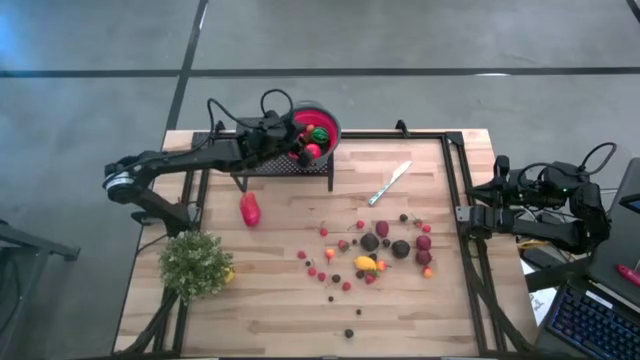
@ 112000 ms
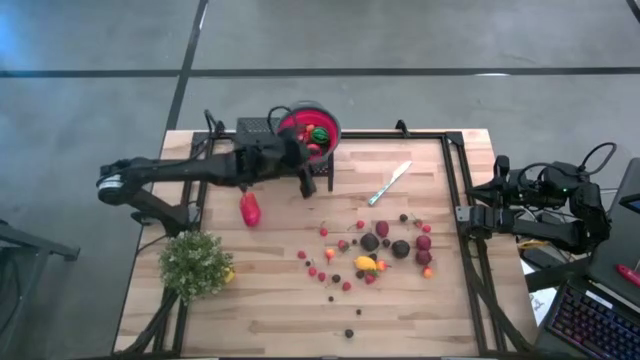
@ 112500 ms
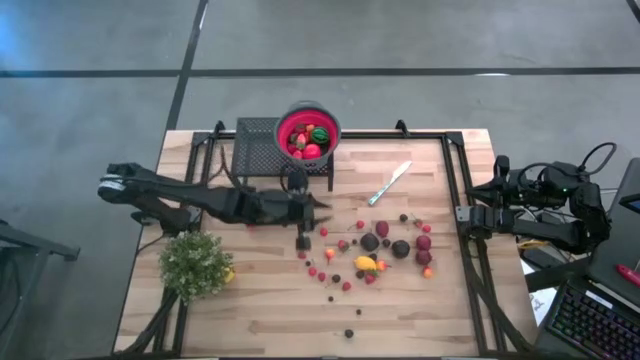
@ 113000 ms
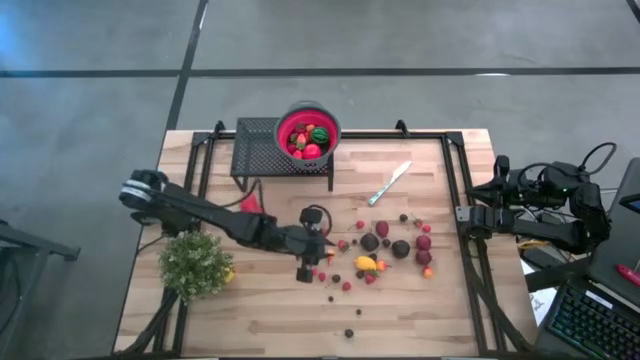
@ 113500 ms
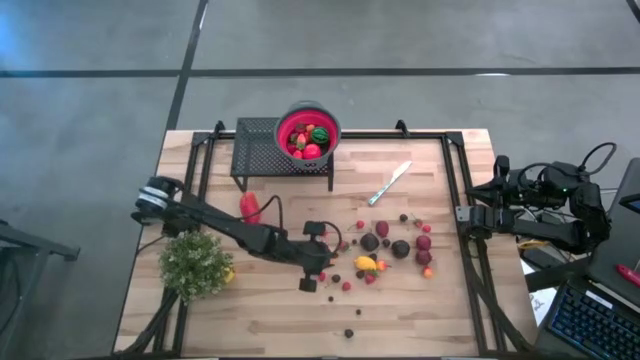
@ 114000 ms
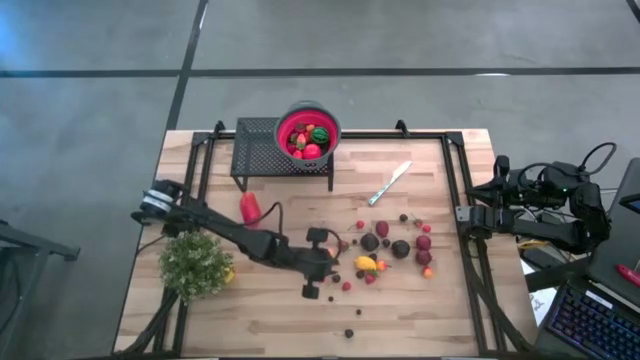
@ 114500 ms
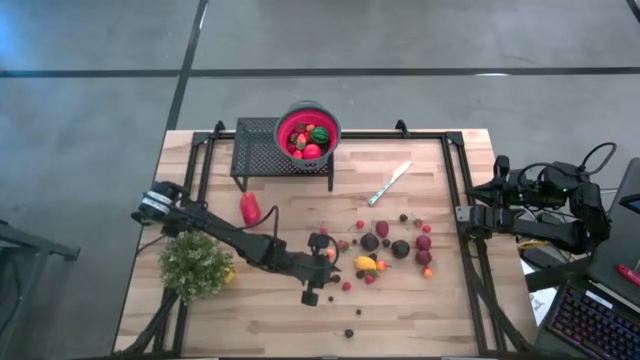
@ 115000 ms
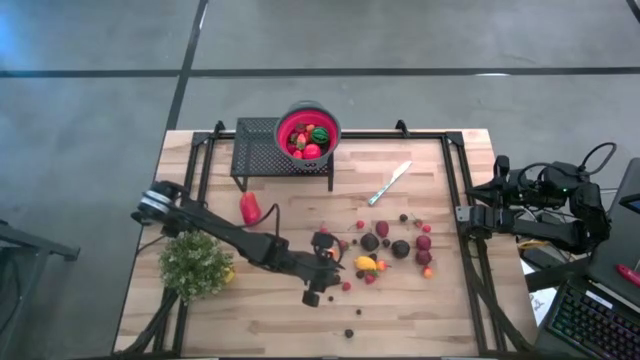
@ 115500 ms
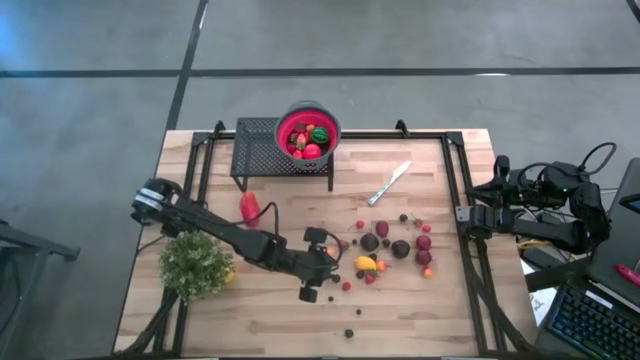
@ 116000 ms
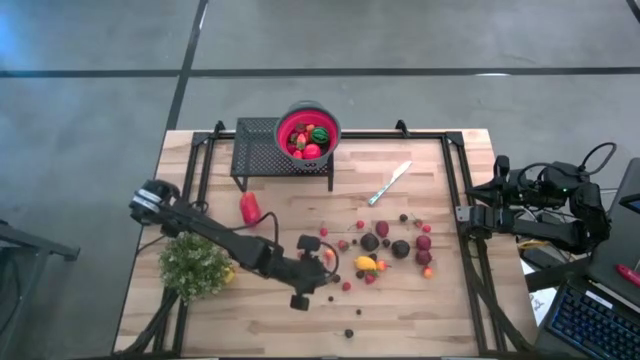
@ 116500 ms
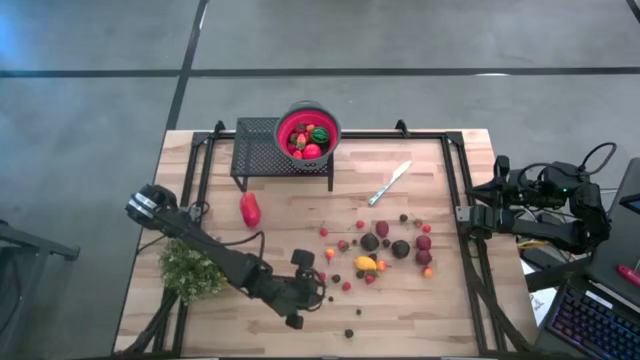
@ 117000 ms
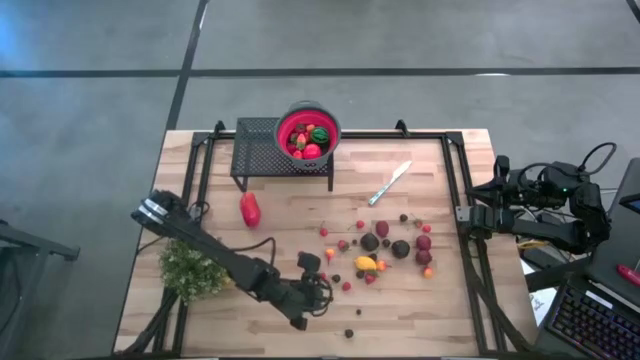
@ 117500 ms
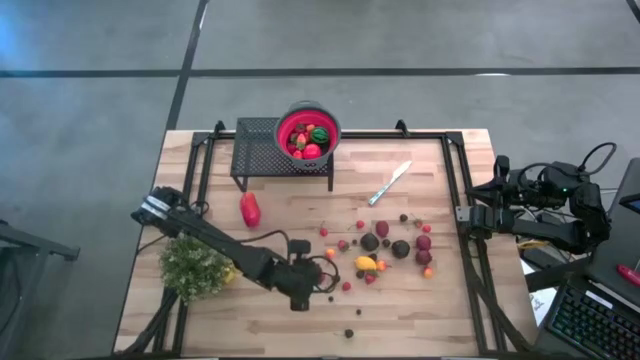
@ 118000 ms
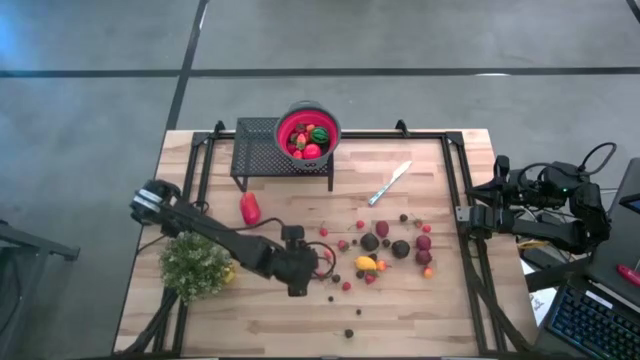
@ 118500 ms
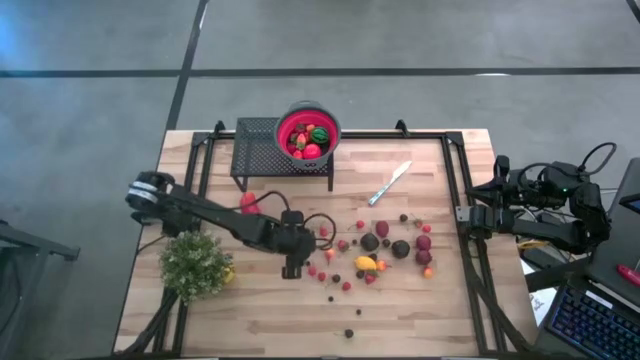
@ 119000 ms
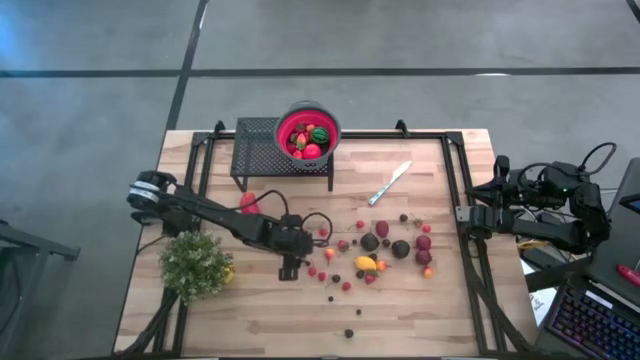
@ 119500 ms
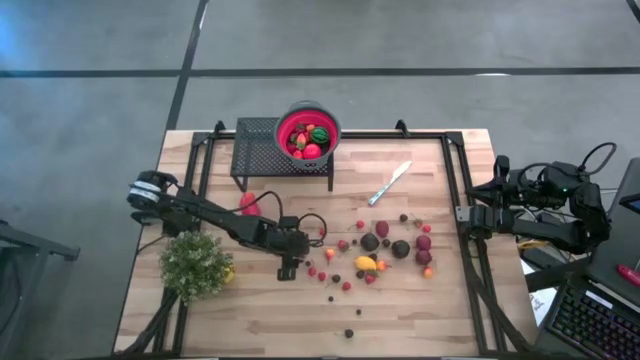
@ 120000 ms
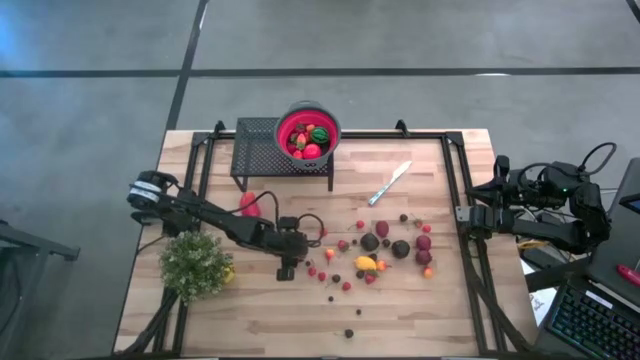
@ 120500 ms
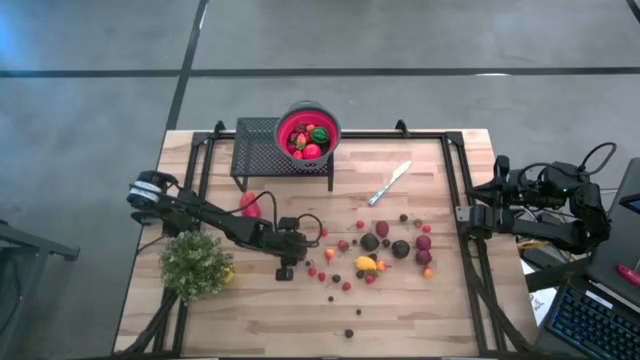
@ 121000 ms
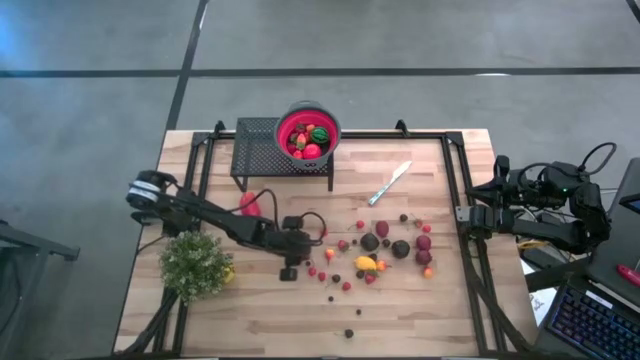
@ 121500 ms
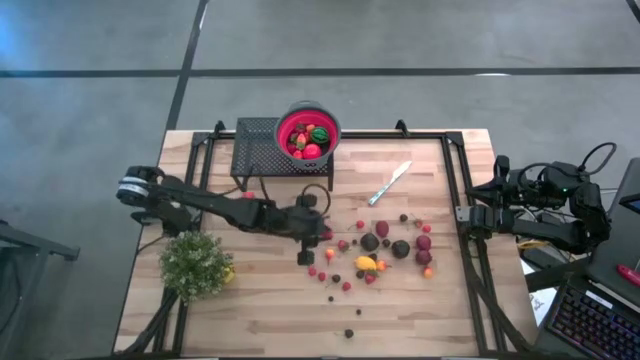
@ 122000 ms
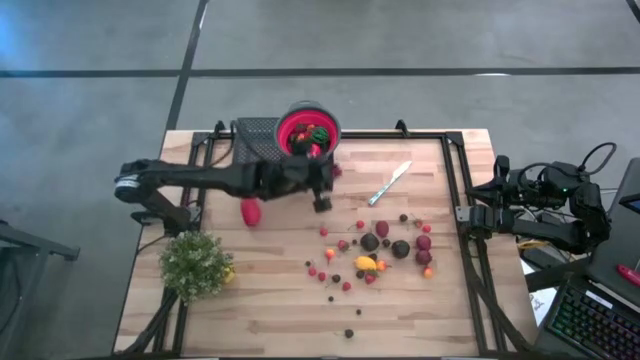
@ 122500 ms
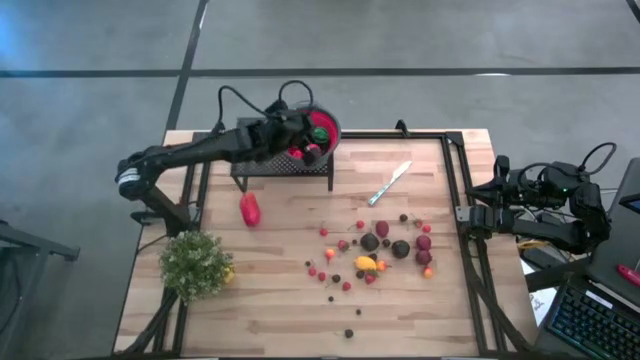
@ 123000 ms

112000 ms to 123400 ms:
Task: Pick & Place Fruit
Put the red raspberry into the red gray strainer bowl on the shelf

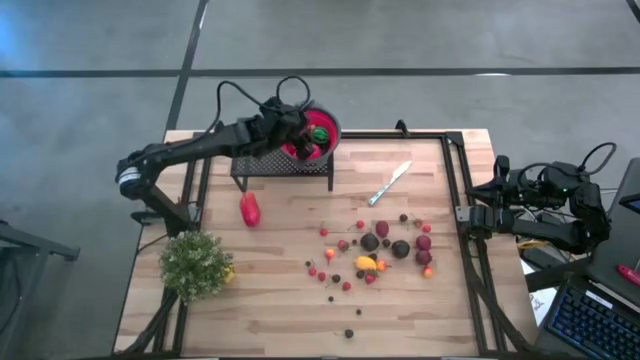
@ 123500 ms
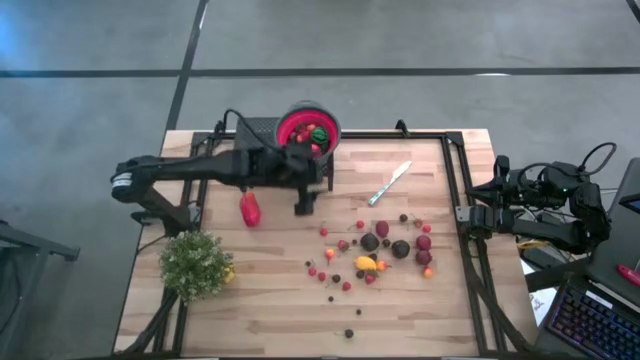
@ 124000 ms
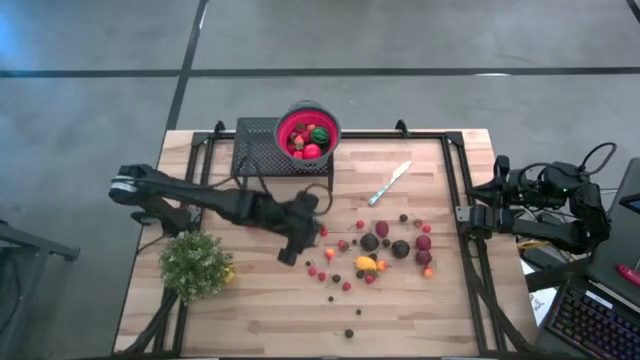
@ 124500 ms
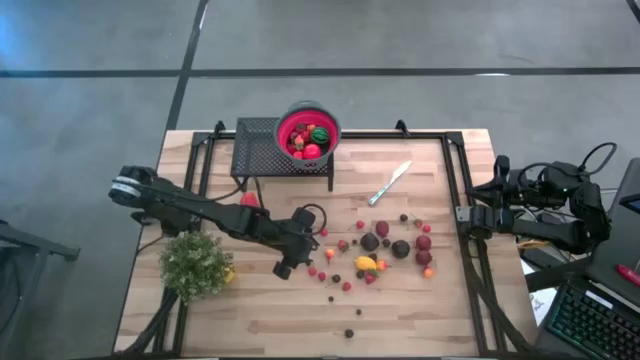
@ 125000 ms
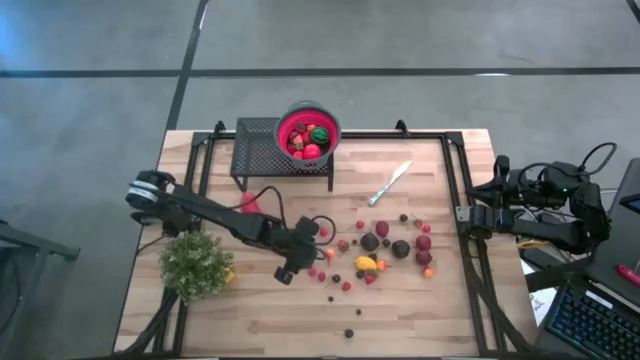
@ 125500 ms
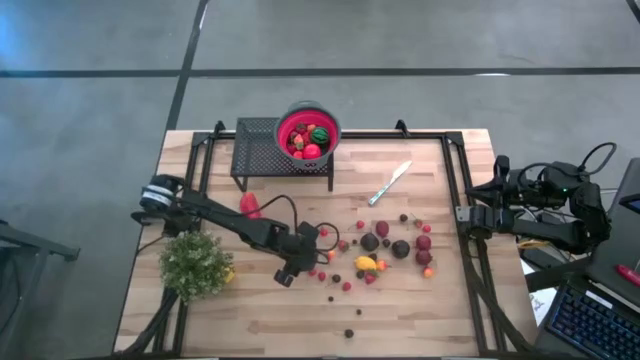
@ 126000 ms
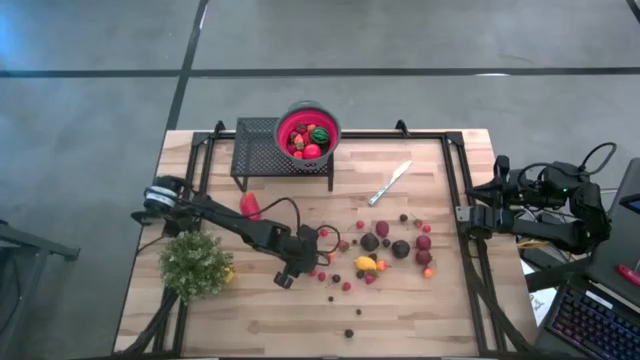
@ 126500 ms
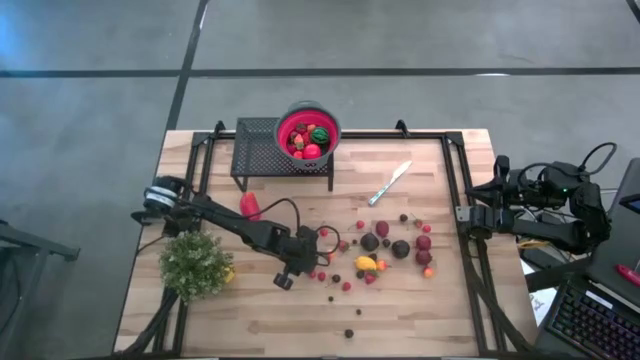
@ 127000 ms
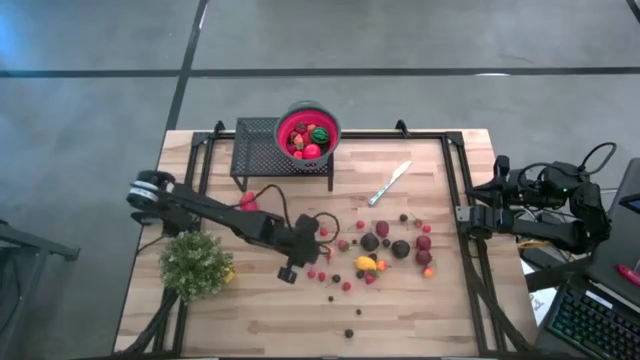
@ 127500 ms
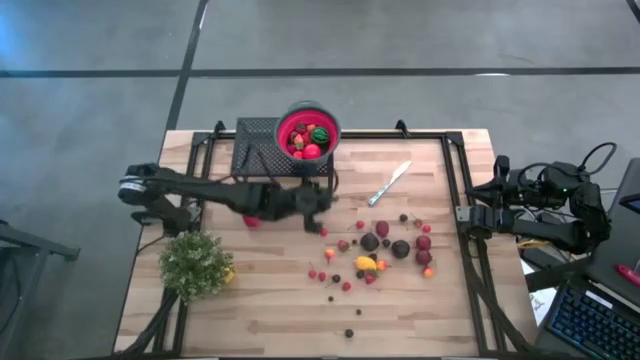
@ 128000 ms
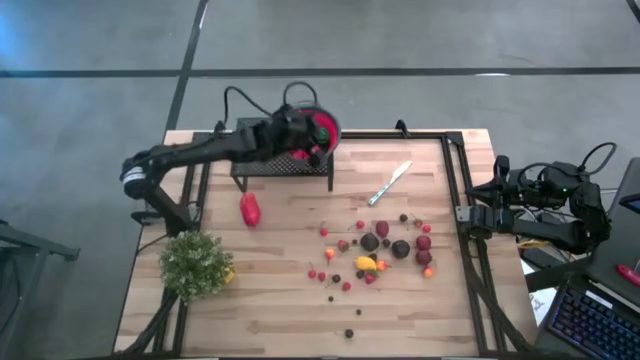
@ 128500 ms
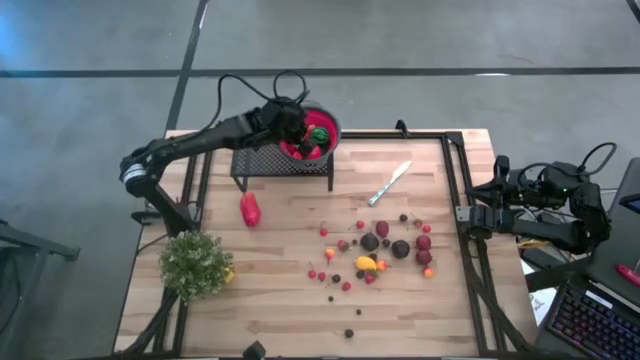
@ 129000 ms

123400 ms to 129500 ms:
Put the blueberry into the red gray strainer bowl on the shelf

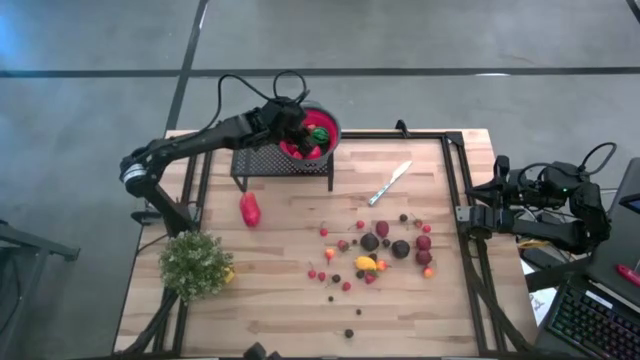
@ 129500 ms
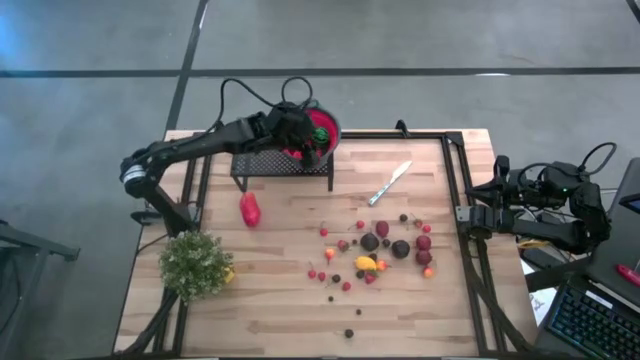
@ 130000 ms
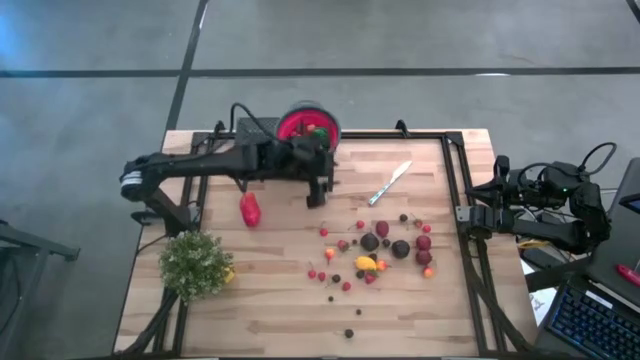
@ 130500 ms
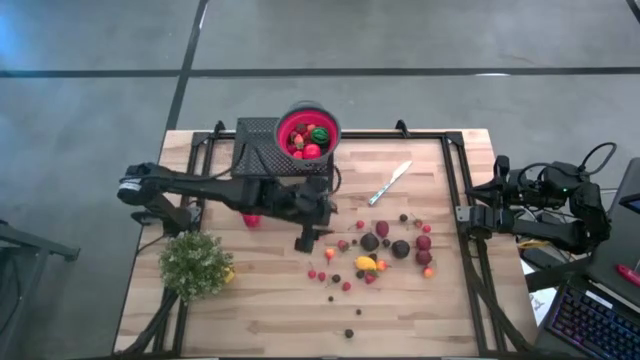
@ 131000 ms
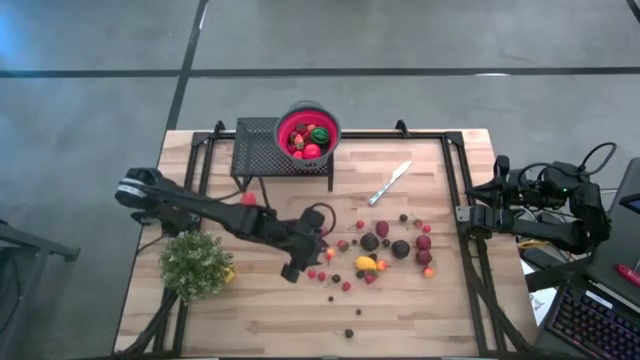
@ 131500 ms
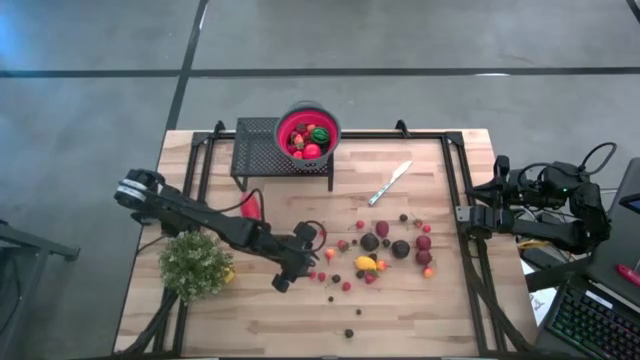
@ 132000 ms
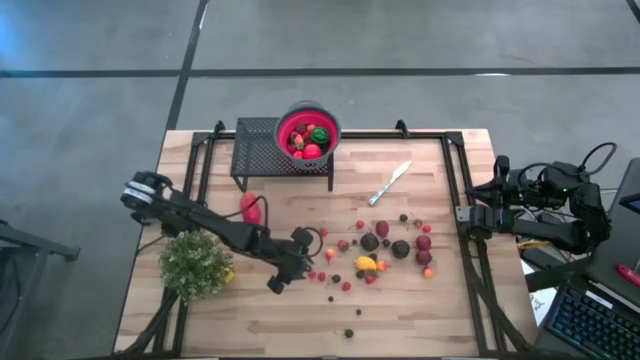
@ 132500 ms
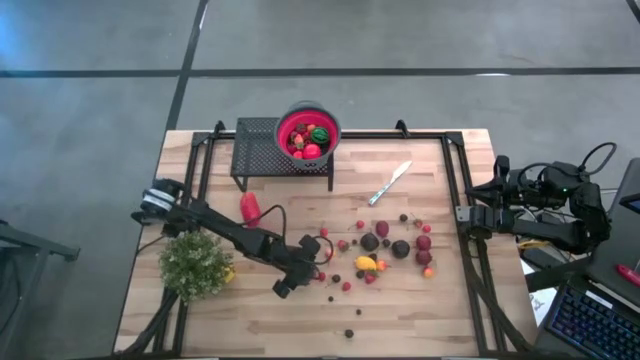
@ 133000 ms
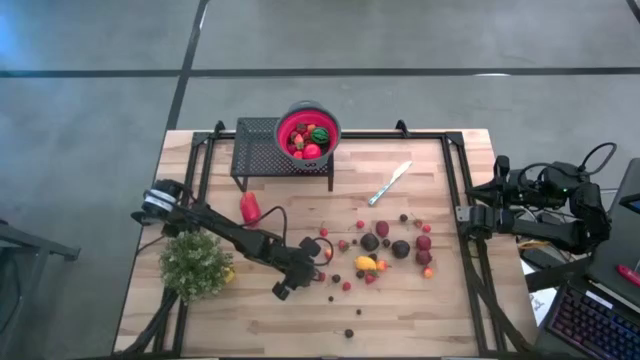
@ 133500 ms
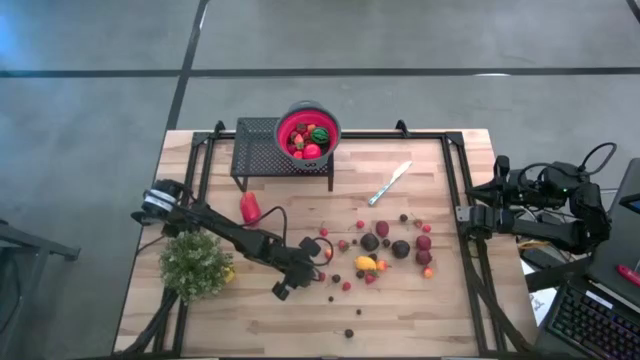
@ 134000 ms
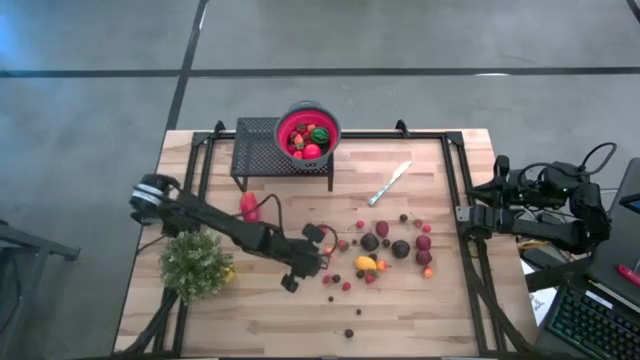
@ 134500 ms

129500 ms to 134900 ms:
Put the red cherry into the red gray strainer bowl on the shelf
